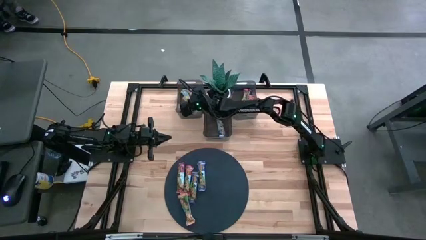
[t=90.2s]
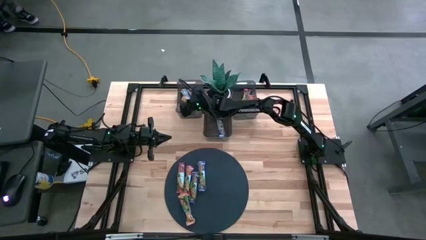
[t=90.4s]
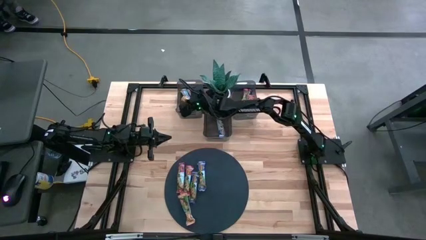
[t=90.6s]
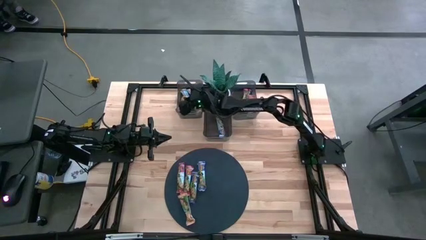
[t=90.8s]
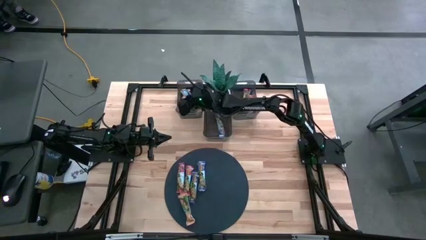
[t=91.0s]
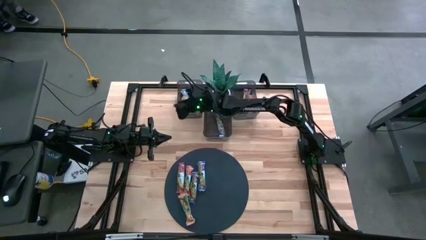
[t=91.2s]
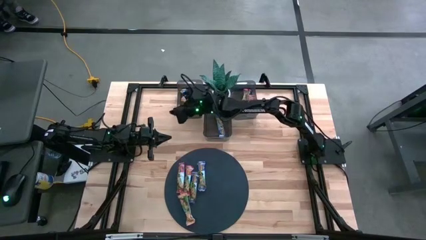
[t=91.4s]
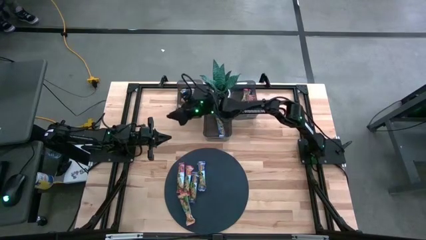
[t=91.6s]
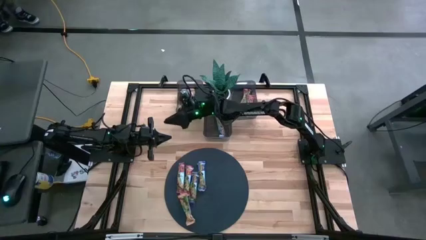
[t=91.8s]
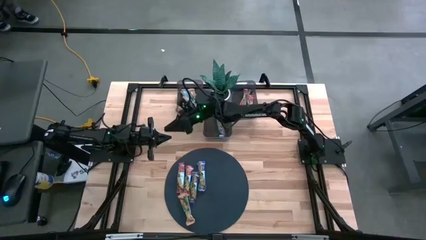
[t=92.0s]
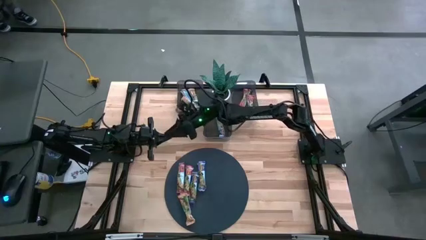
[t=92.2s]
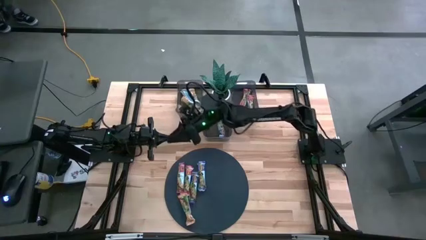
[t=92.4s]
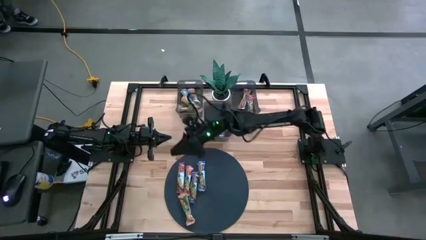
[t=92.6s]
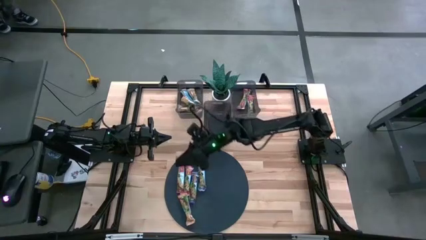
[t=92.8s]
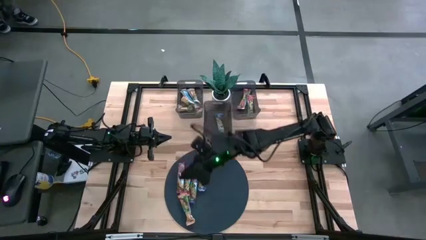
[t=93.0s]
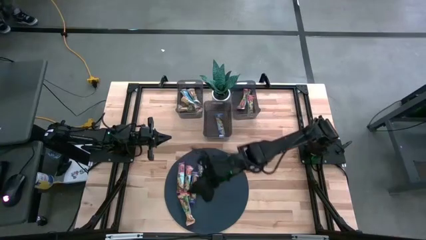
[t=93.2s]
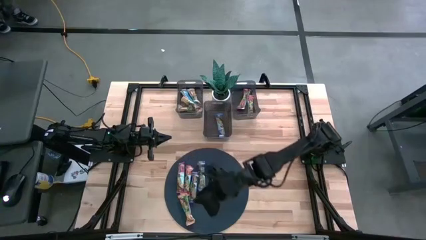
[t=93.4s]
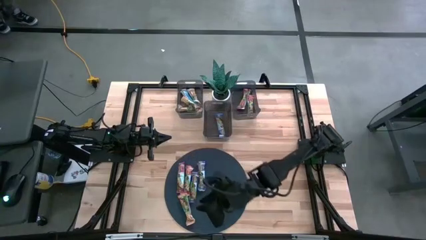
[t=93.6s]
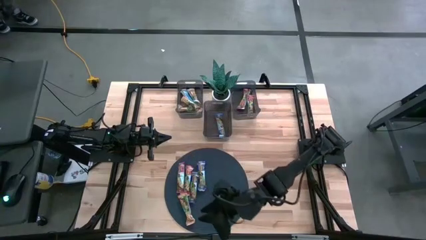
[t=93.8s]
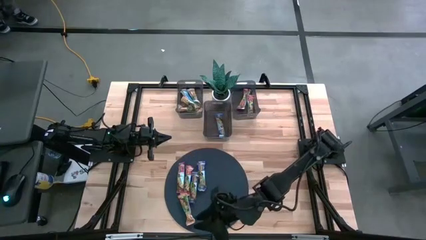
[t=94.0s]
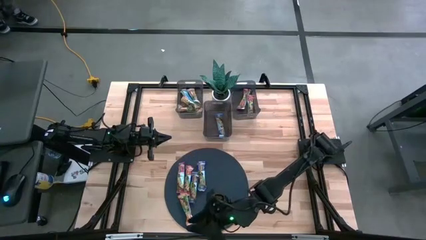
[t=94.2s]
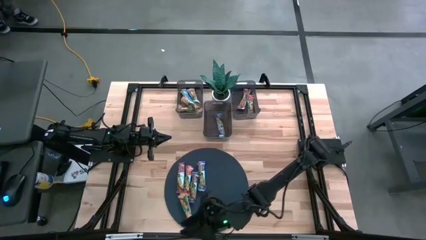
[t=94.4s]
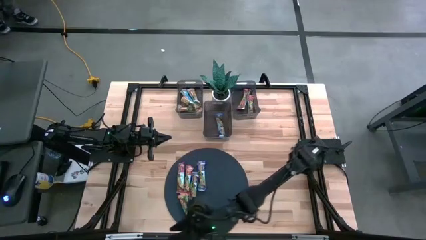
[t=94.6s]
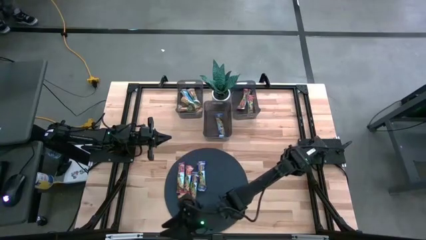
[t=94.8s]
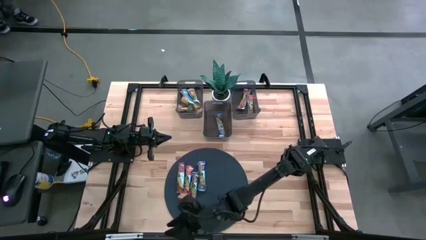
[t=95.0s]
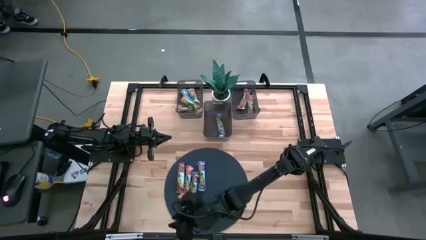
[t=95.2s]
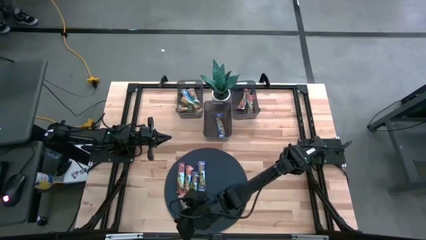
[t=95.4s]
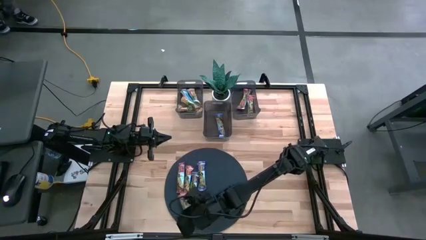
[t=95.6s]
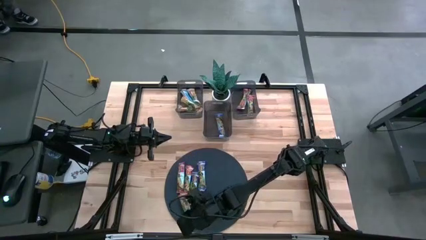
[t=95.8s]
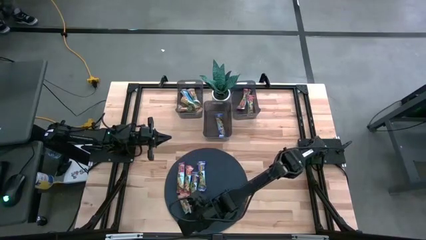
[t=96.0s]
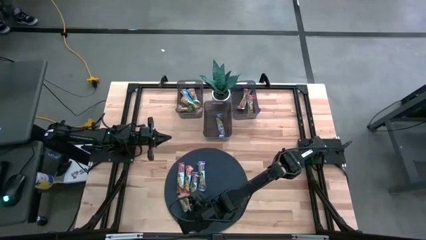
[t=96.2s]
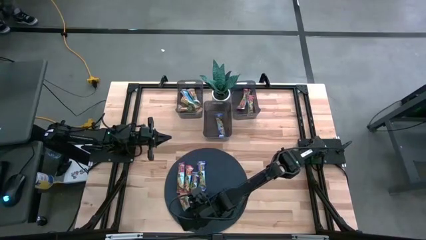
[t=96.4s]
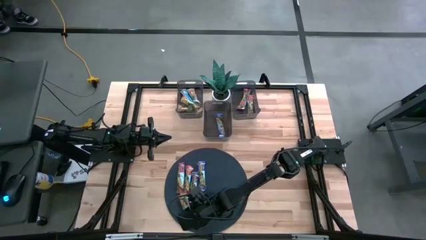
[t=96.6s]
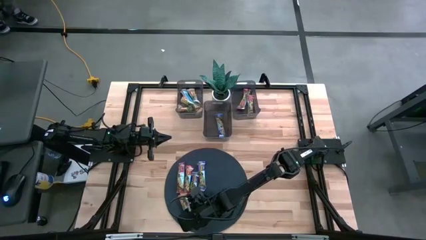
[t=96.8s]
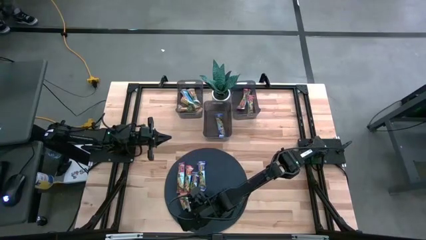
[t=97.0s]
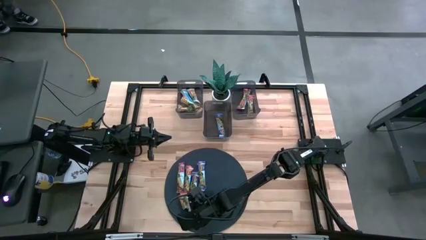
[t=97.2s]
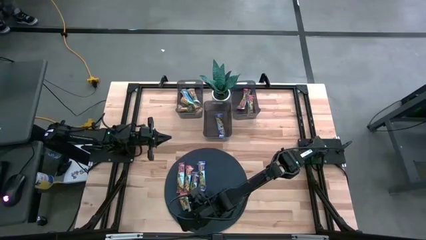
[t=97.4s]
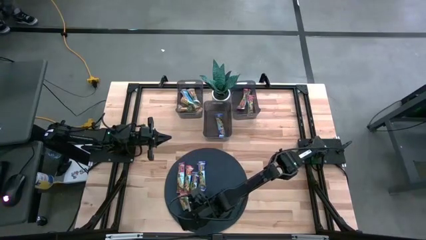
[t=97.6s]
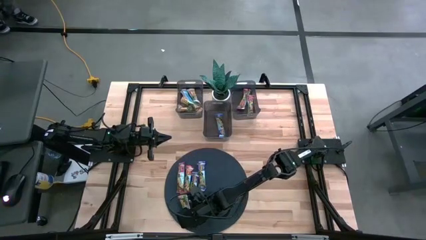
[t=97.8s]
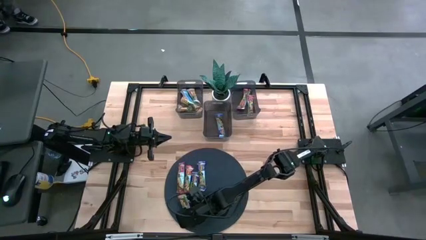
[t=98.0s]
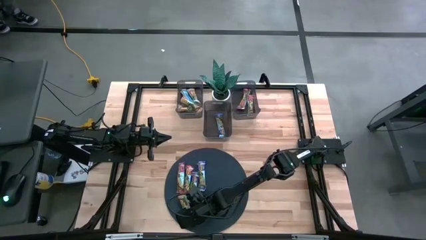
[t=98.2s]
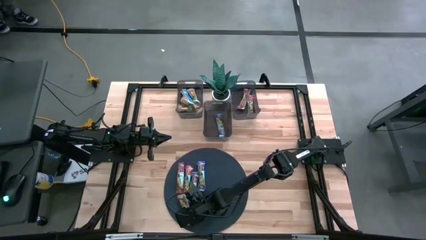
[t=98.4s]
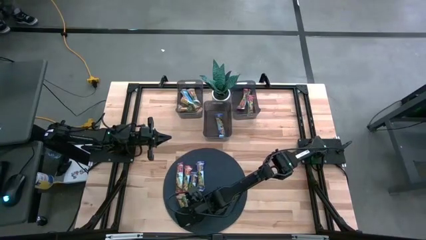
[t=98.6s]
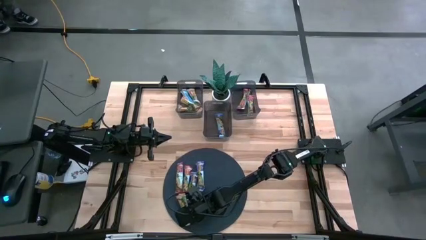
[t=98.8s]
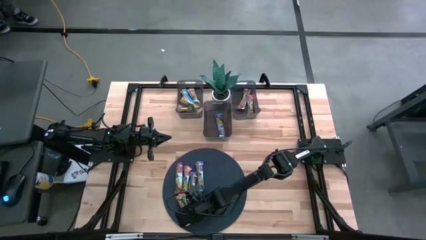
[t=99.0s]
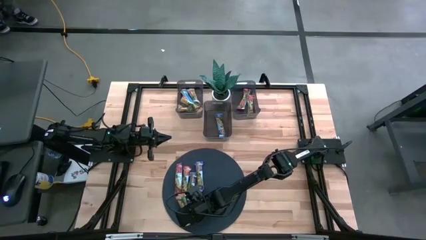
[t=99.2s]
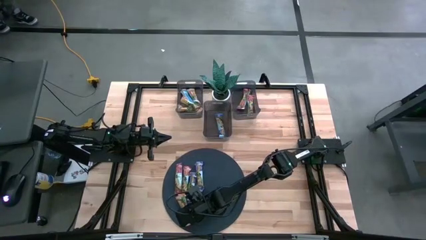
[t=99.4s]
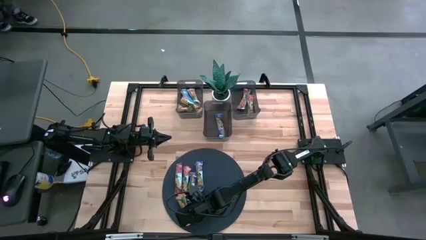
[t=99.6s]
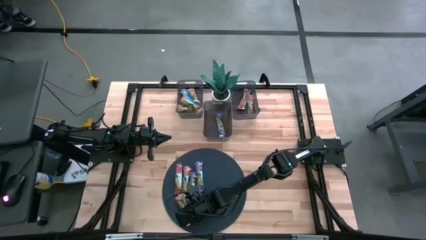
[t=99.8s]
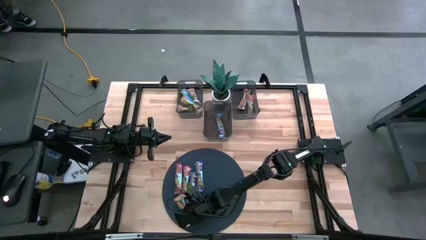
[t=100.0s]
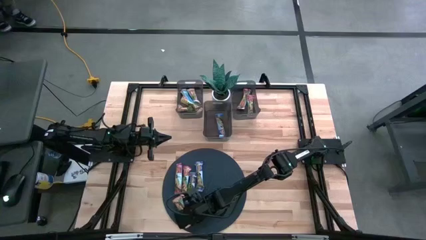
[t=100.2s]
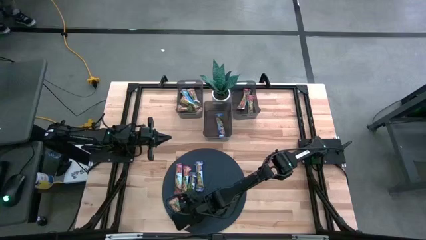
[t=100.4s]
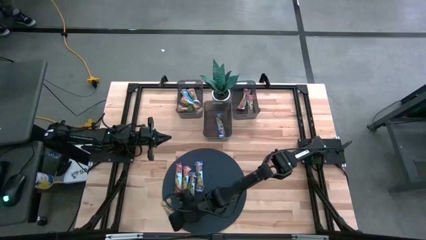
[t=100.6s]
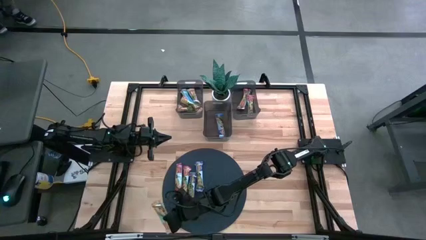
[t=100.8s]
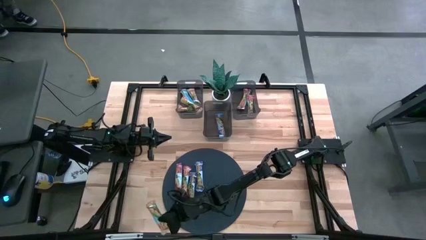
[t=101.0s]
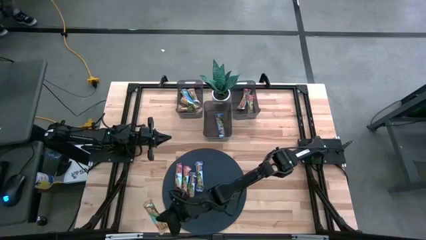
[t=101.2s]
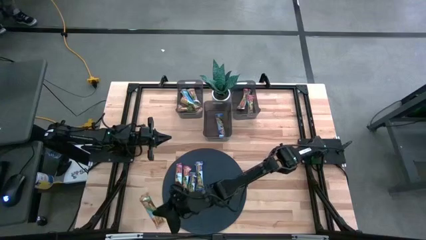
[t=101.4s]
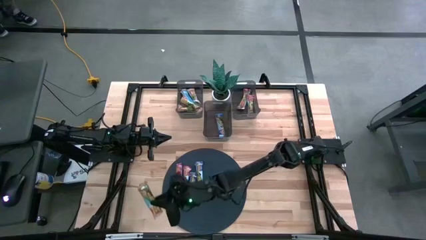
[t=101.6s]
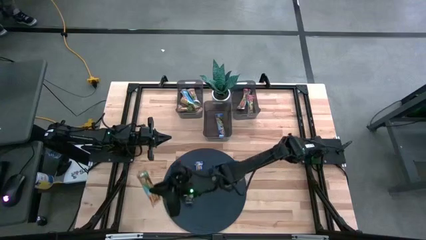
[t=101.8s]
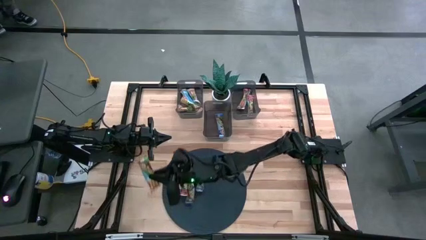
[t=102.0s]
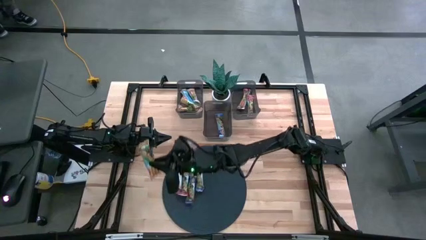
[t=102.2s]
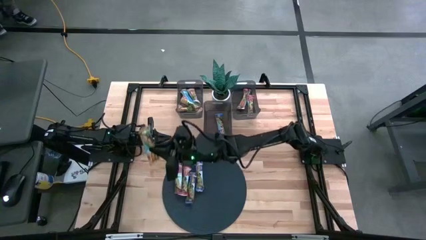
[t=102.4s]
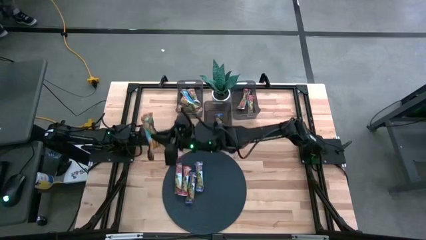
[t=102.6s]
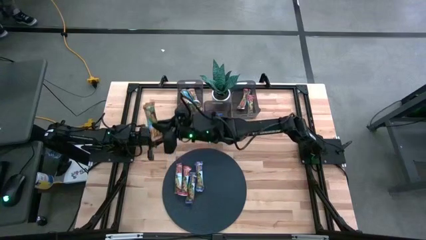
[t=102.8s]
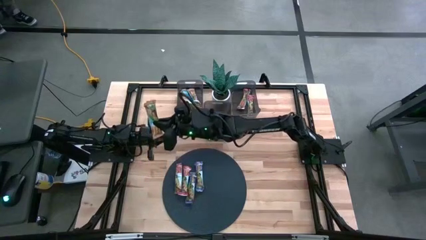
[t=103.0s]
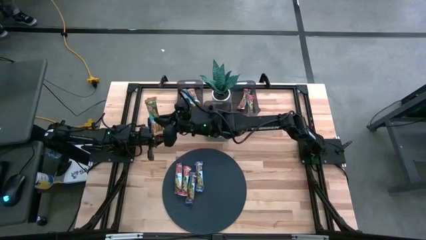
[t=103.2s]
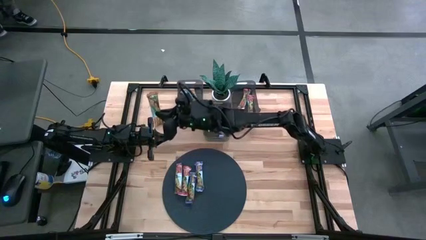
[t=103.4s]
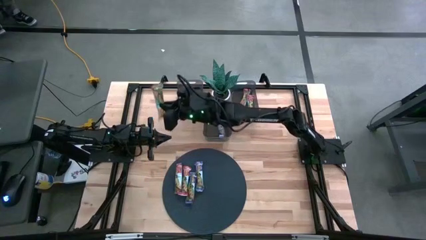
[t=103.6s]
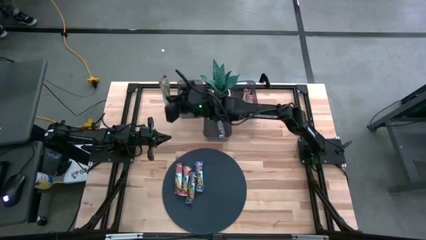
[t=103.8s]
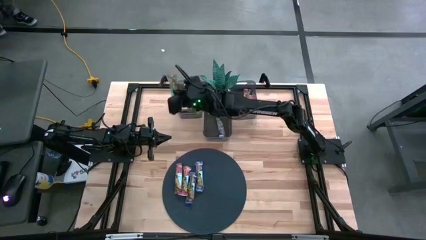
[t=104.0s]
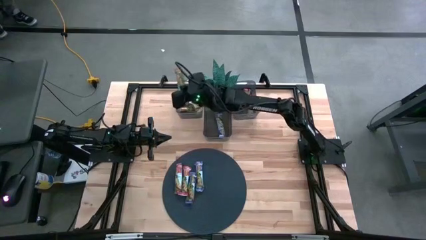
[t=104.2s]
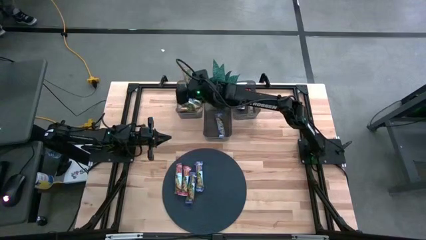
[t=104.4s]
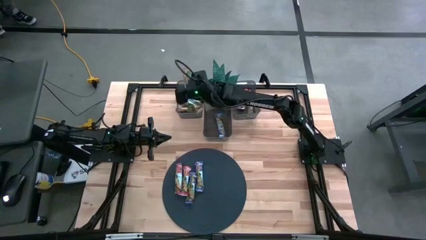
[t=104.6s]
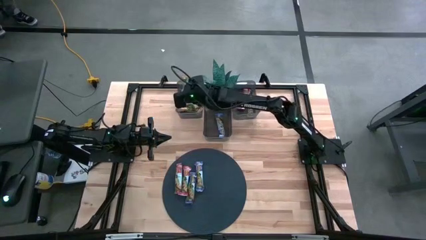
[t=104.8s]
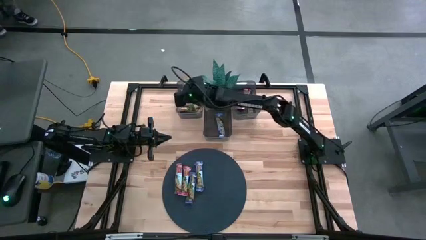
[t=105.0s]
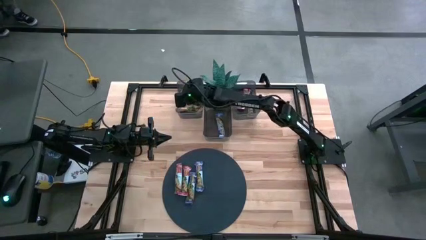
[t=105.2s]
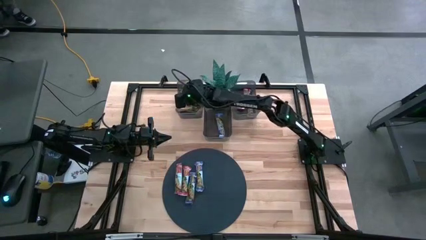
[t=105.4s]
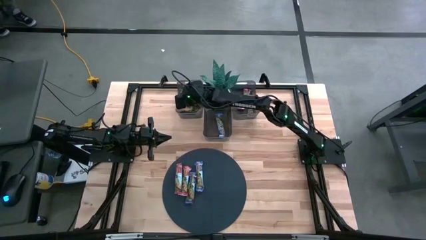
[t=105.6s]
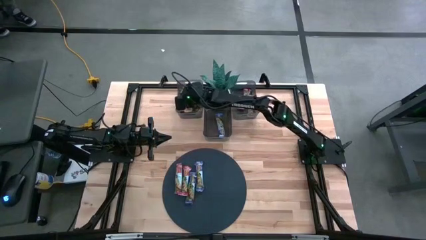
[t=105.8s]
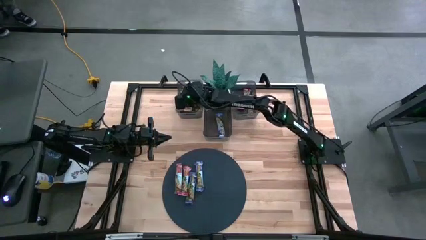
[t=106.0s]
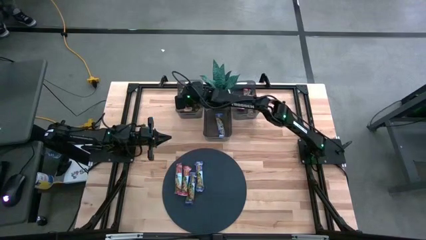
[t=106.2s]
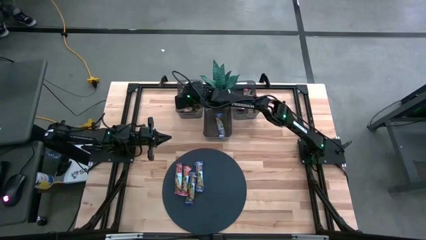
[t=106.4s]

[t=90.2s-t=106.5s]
Task: Pick and place Granola Bars by type
Put the yellow granola bar into the left black bin
